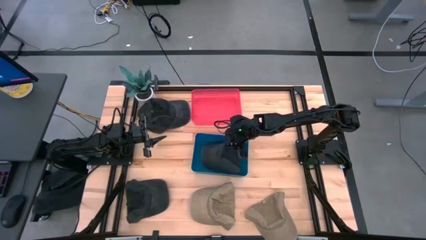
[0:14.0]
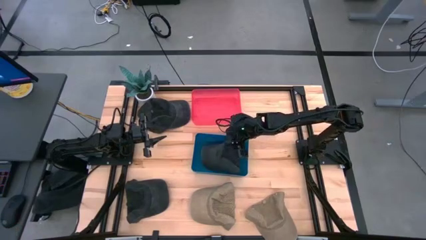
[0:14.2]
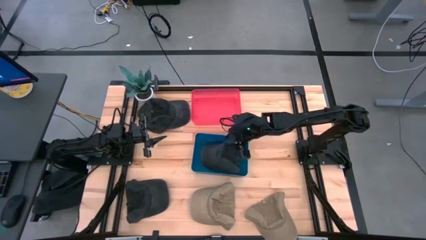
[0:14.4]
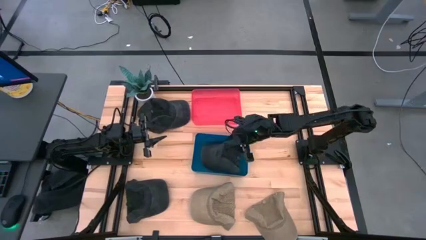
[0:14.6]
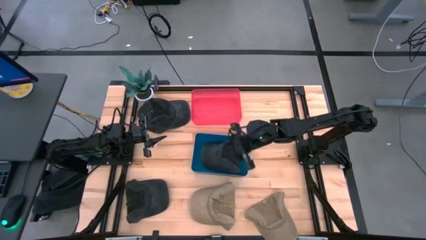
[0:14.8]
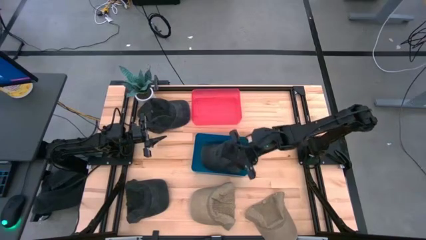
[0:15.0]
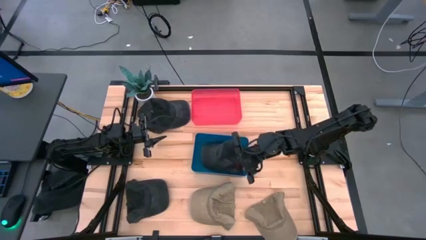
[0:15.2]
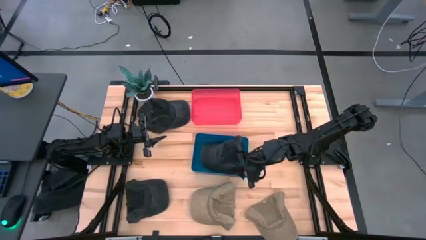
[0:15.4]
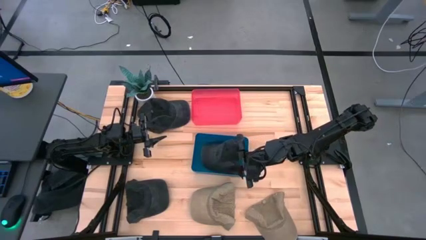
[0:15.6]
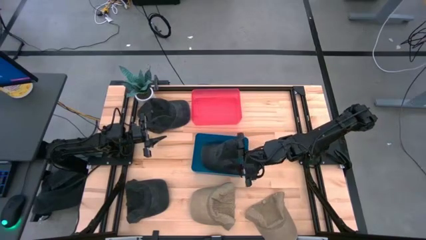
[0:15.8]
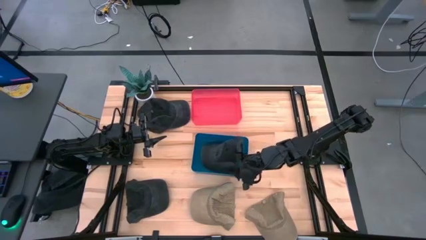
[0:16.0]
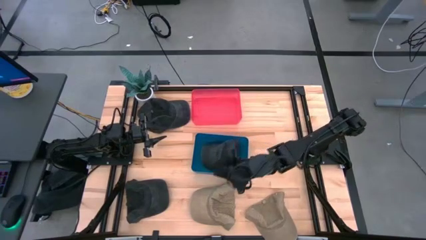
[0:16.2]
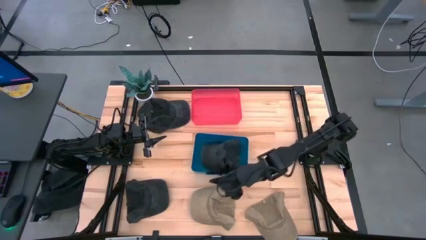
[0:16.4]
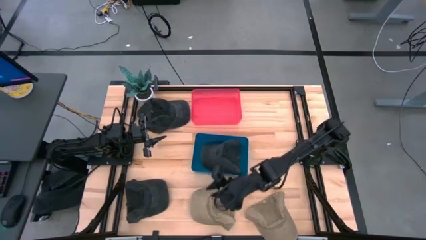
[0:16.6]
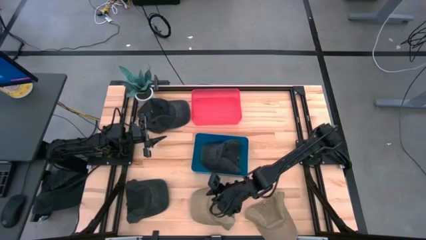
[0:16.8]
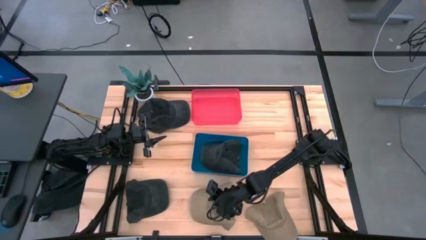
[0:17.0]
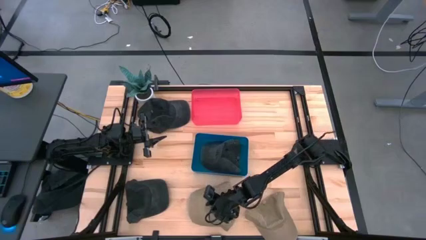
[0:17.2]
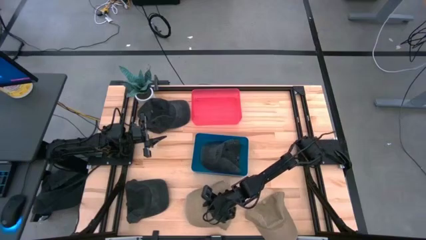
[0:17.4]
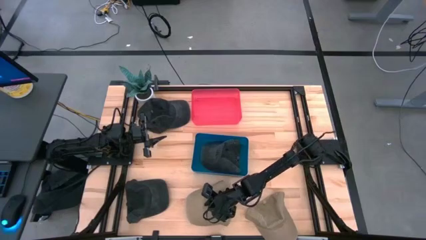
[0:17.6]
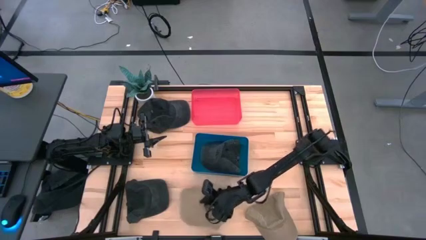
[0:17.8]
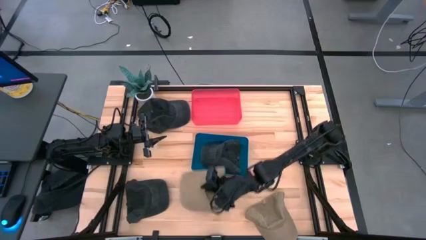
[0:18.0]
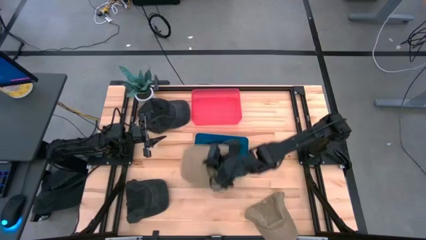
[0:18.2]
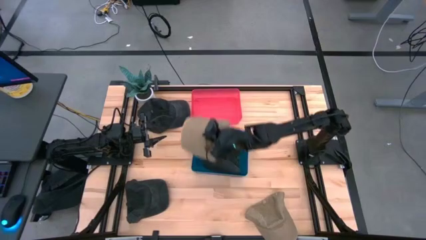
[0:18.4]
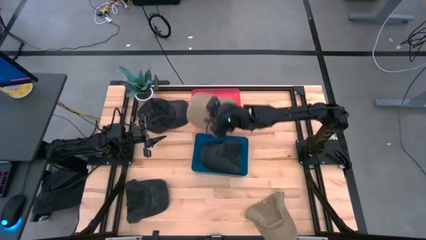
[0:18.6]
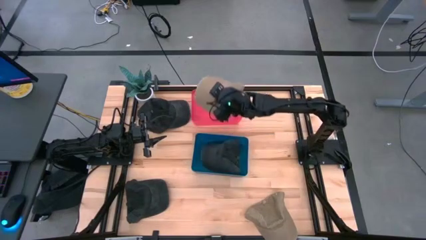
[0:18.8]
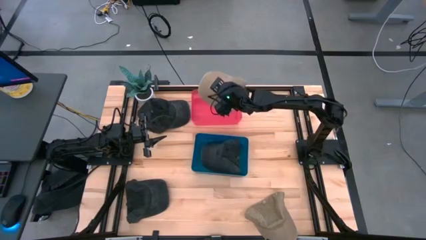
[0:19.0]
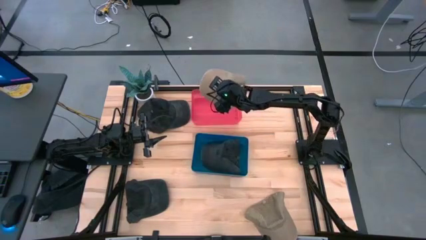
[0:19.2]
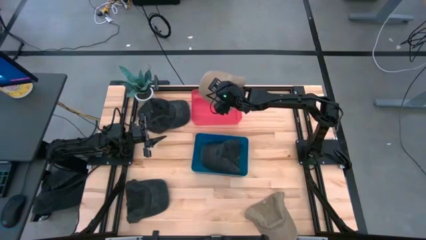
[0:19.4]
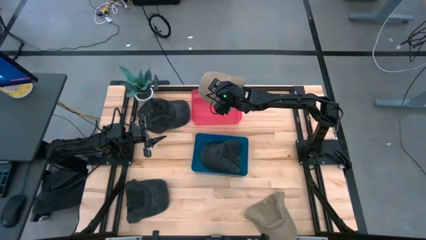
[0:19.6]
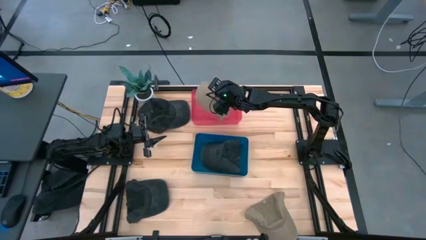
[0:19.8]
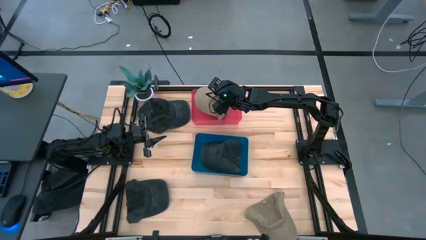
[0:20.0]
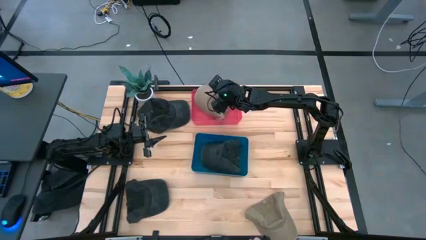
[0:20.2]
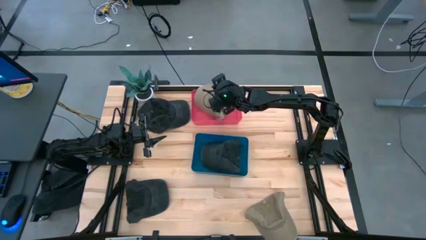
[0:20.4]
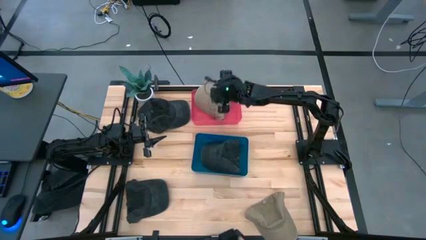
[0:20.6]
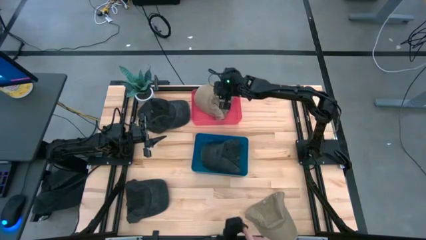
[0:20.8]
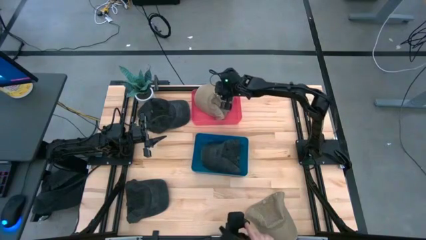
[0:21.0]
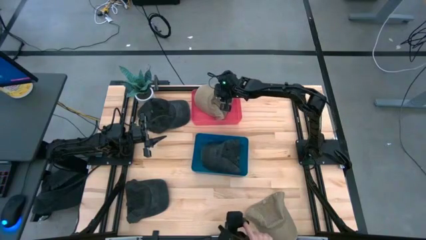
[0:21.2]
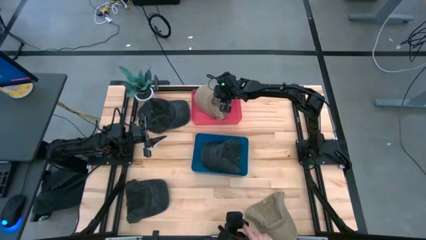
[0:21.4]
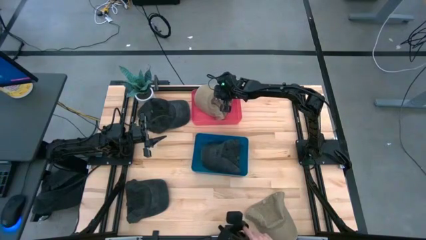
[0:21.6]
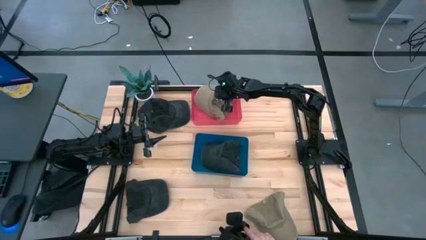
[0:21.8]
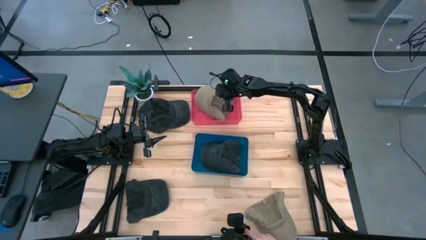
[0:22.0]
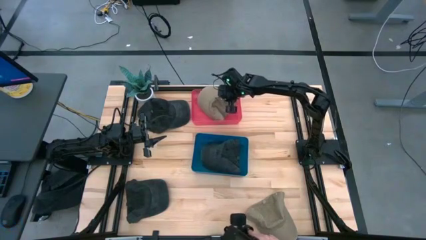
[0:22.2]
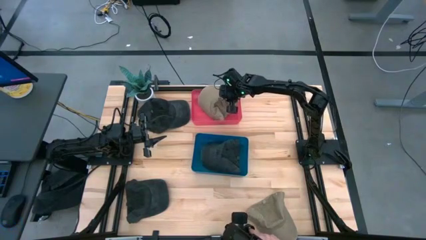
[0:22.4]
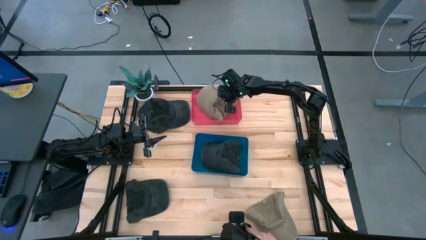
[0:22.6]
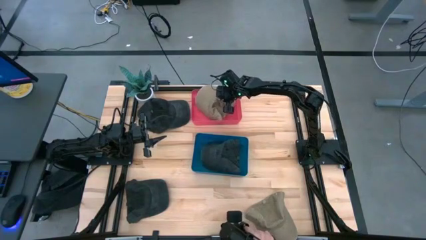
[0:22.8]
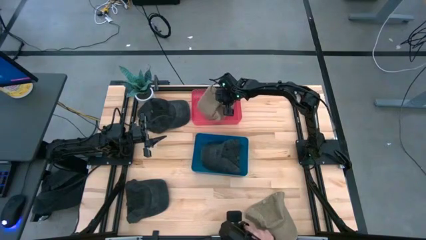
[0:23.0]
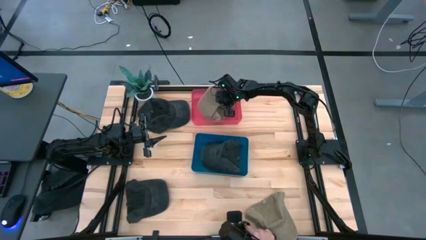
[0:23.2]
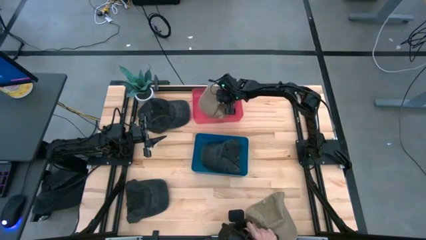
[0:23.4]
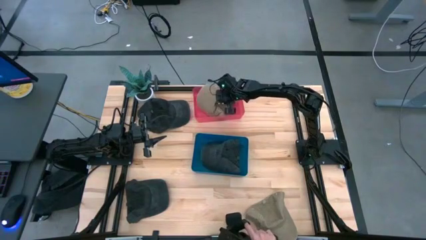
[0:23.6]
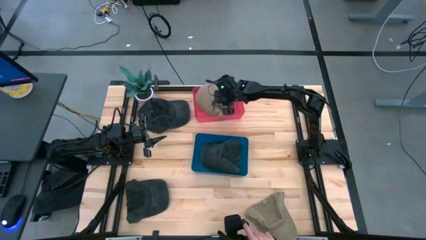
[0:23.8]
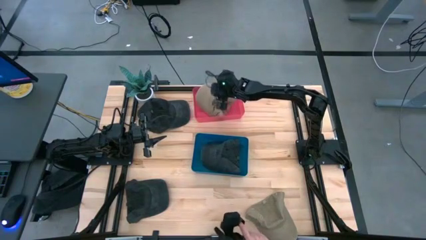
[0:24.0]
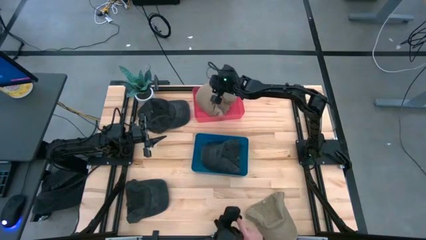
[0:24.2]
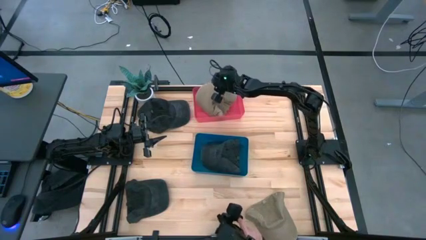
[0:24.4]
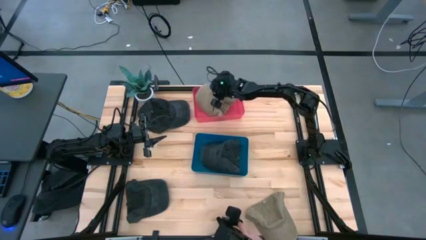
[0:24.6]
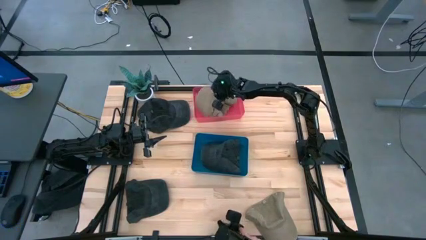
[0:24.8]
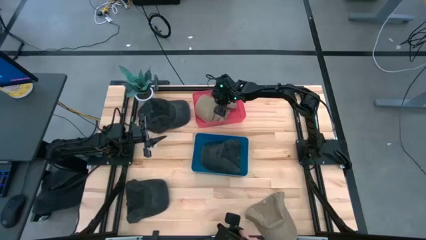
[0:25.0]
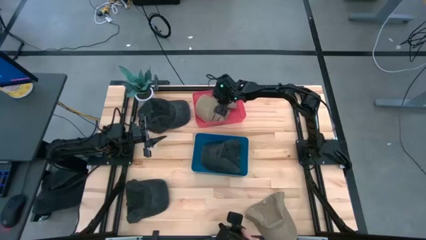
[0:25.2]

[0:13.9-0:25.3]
Task: Pick & Place hat
Put the left brown cap into the red bin
